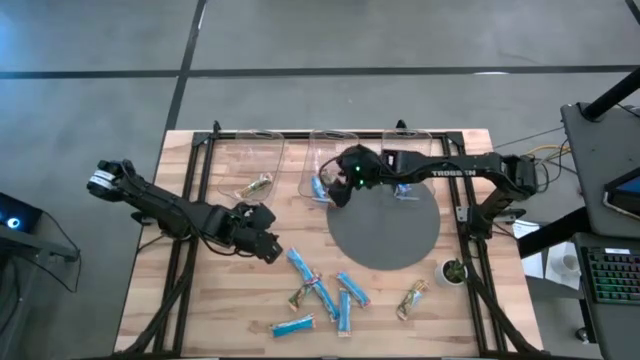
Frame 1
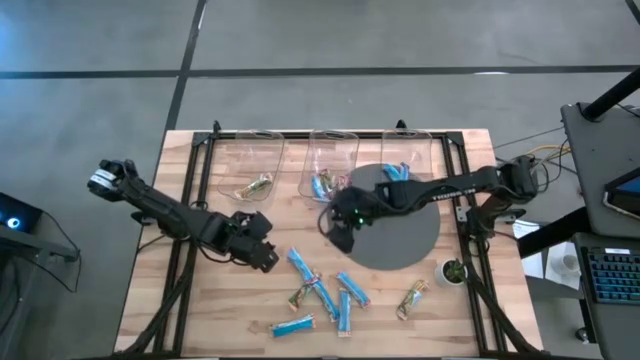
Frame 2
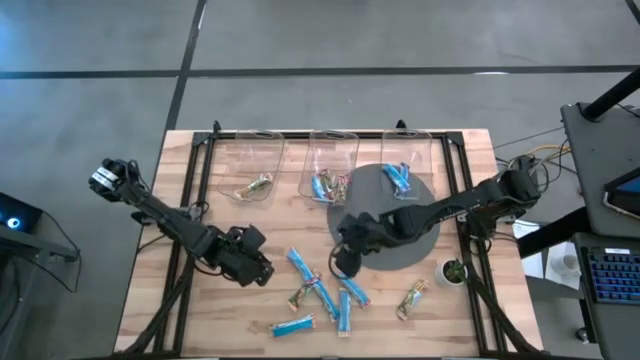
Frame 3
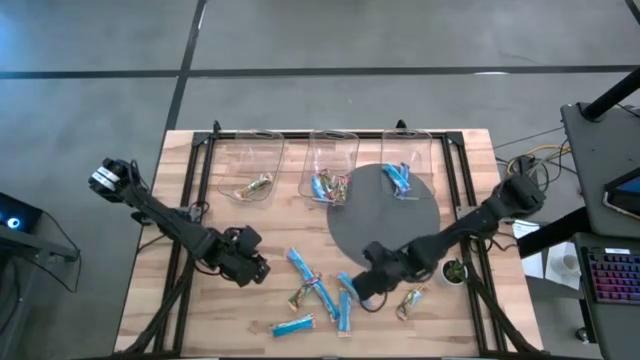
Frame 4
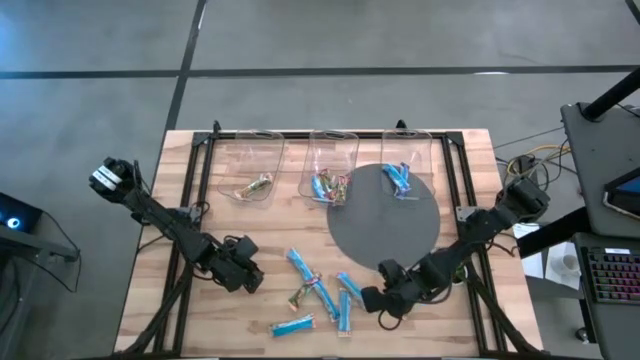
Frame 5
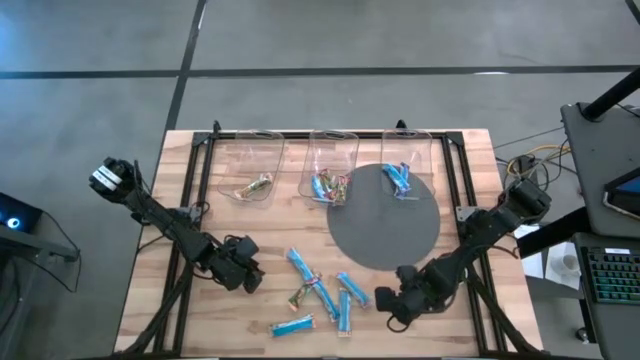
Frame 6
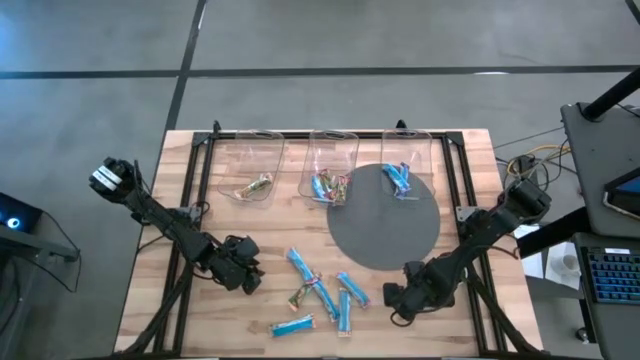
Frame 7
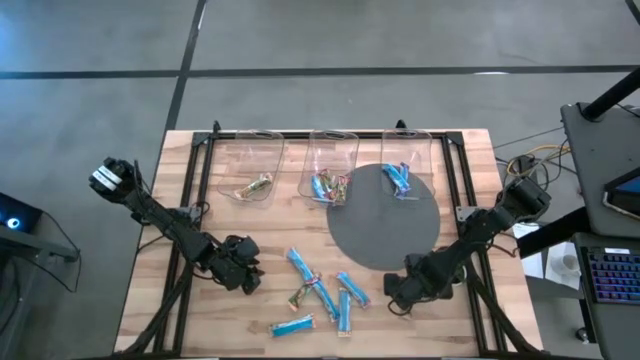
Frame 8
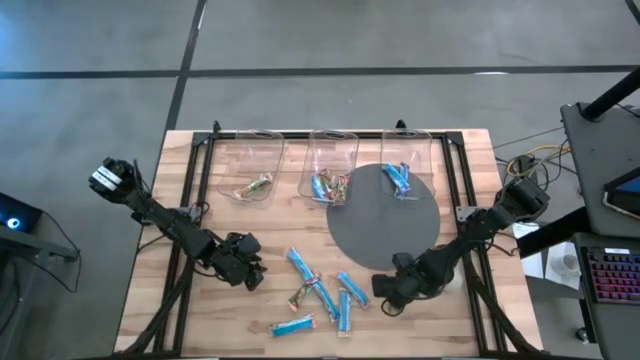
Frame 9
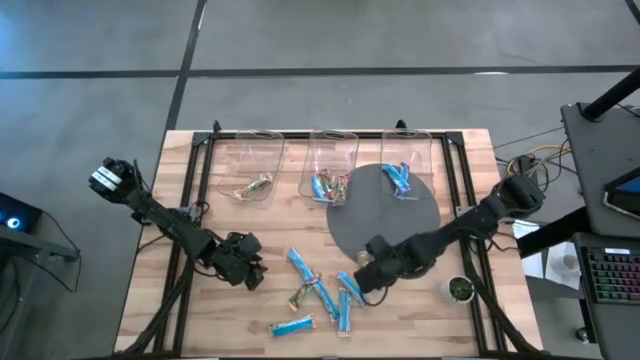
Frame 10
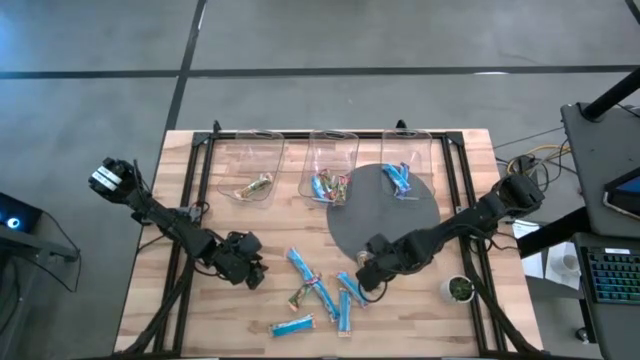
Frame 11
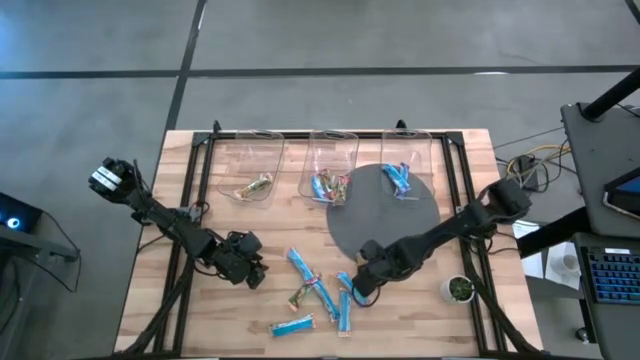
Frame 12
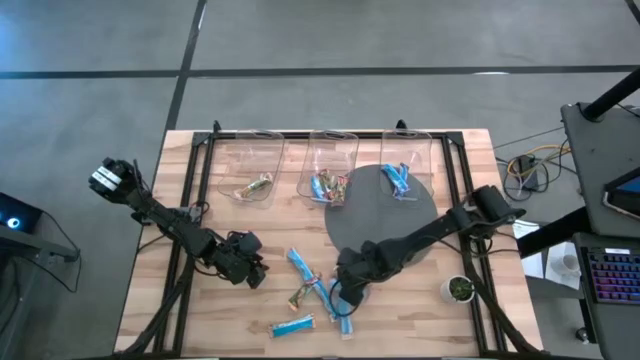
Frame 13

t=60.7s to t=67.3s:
Task: Pick and place Granola Bars by type
Put the yellow granola bar into the left transparent bin

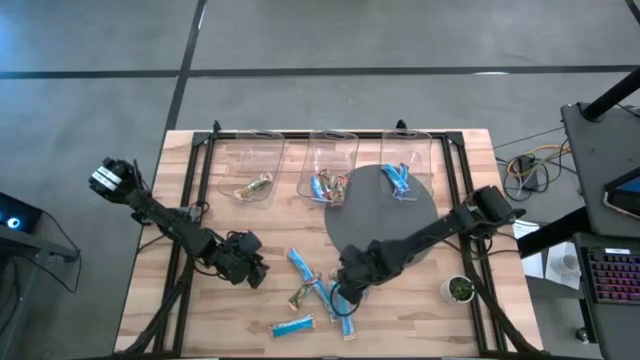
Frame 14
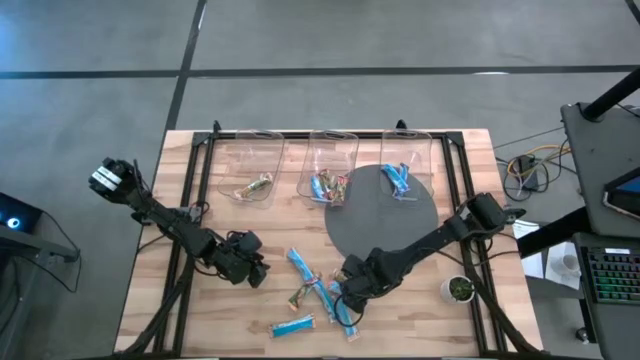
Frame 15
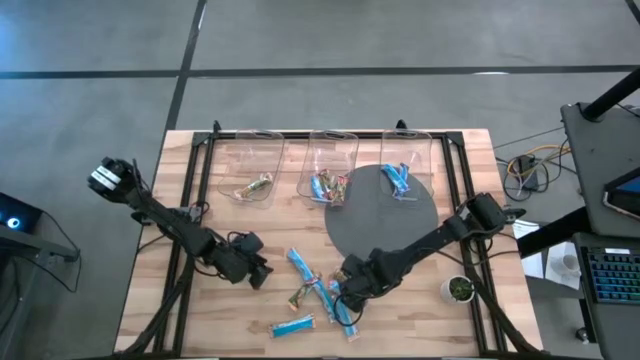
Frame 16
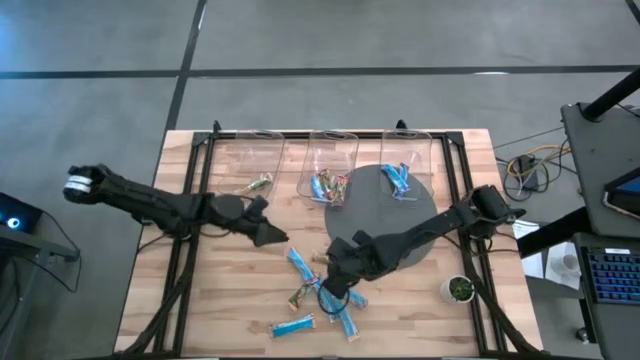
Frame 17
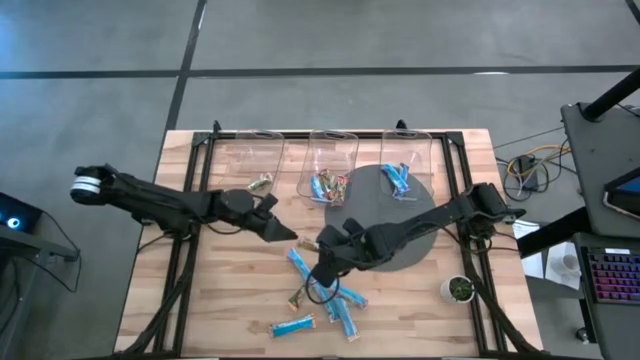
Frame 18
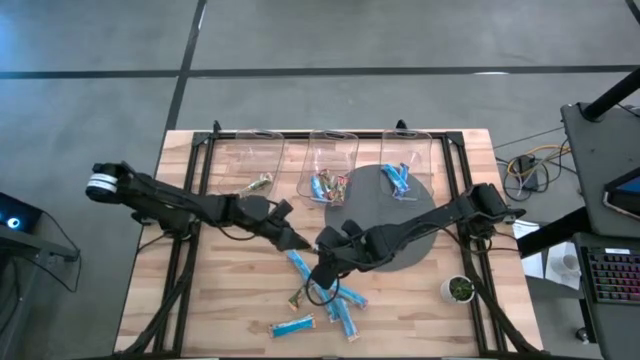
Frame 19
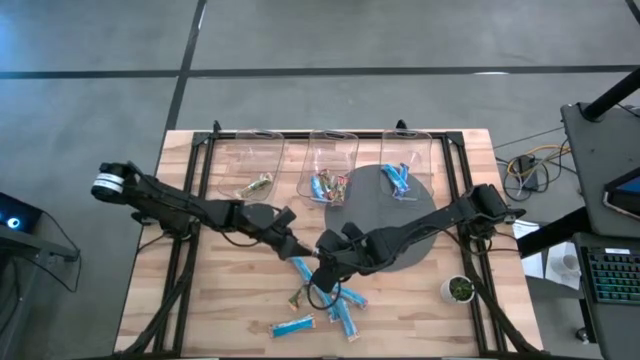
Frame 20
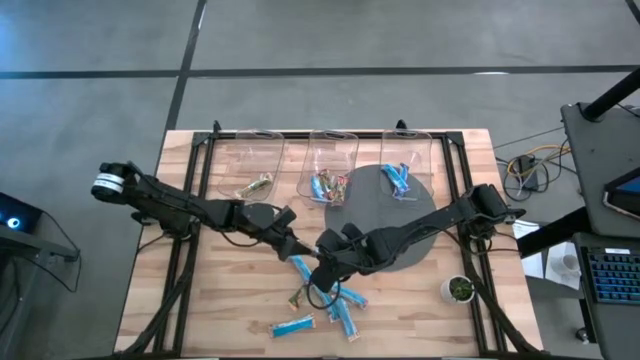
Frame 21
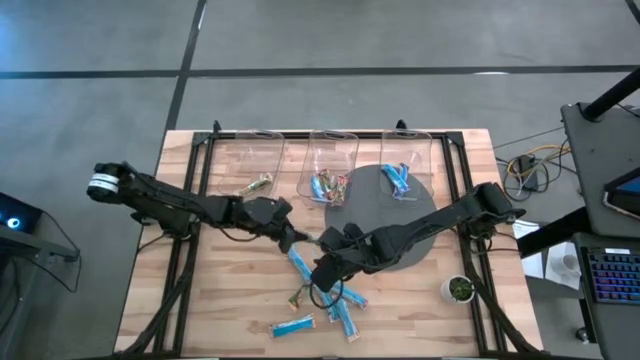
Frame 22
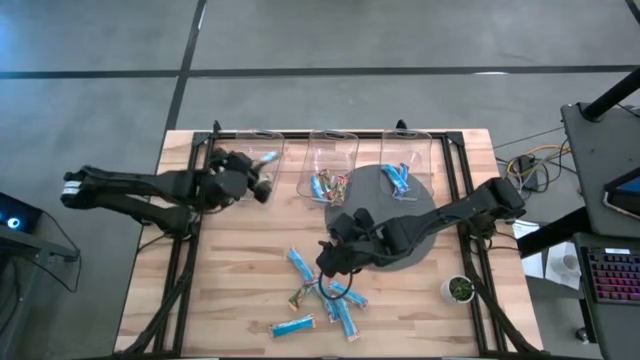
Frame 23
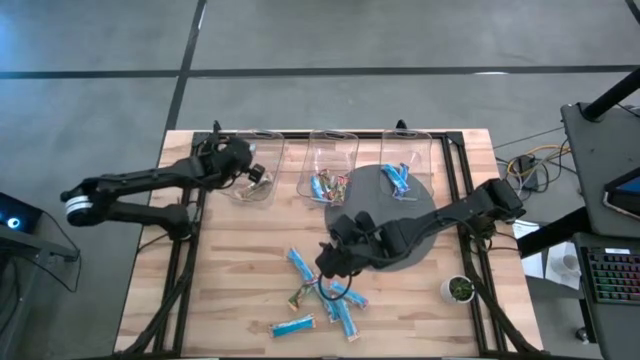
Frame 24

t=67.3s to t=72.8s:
Put the yellow granola bar into the left transparent bin

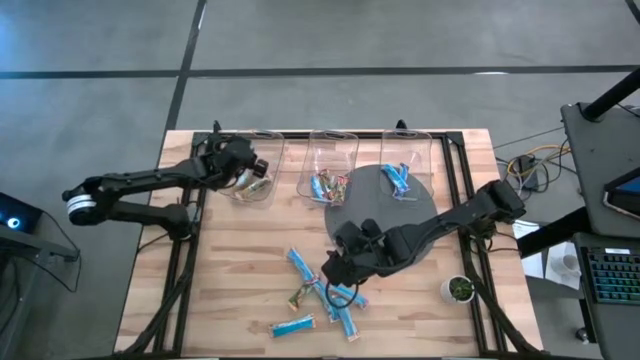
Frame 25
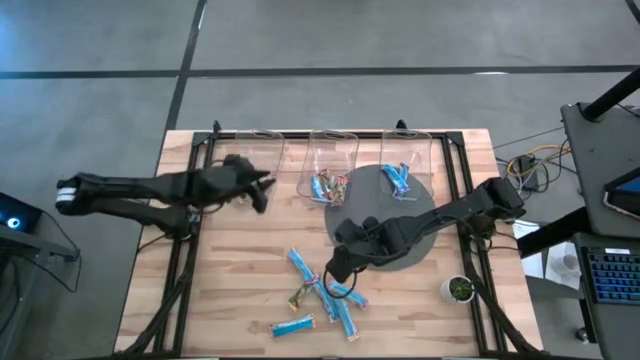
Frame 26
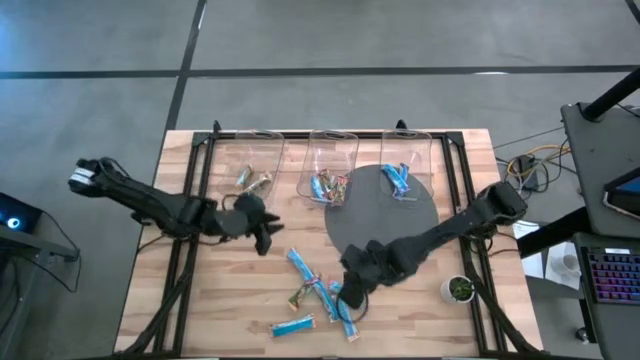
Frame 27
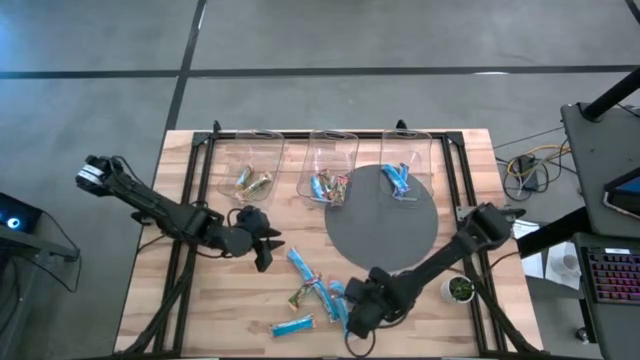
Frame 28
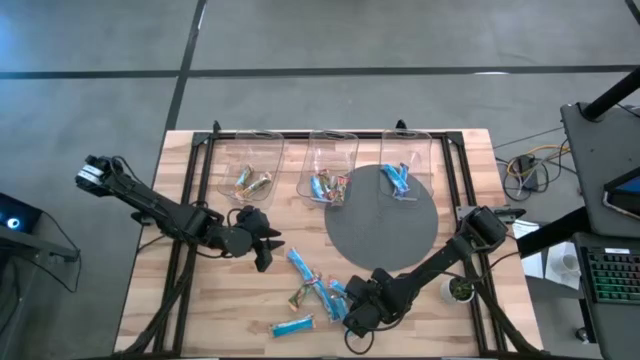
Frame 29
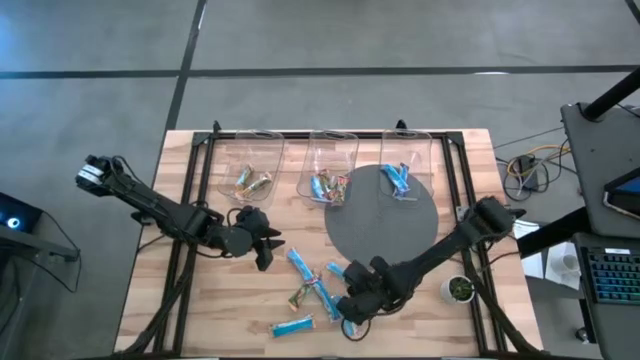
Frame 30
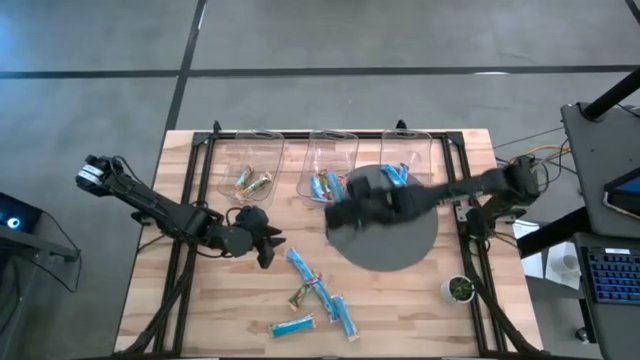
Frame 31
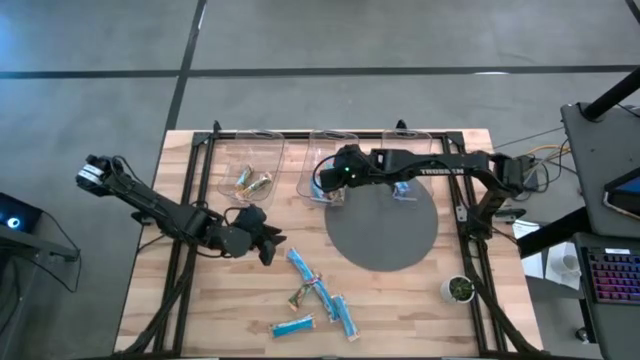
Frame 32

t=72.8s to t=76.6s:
Put the red granola bar into the middle transparent bin

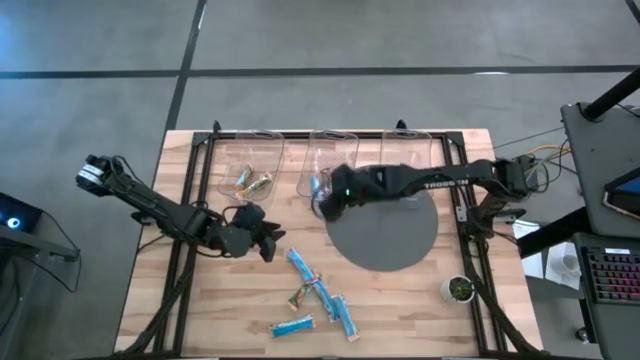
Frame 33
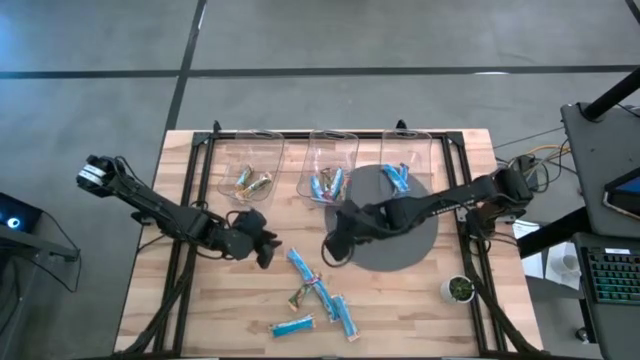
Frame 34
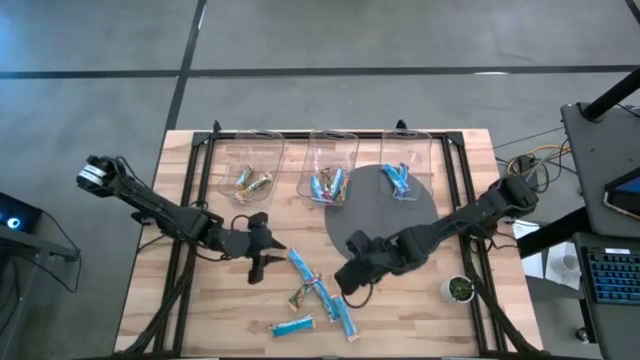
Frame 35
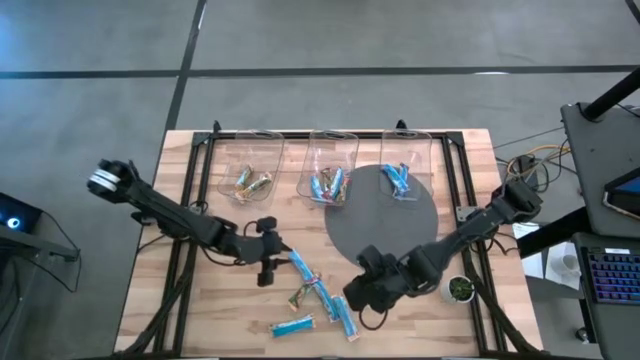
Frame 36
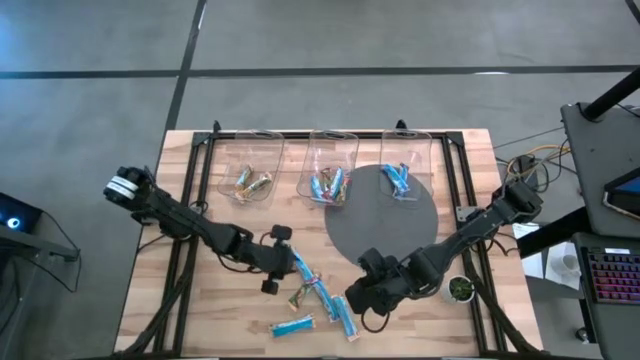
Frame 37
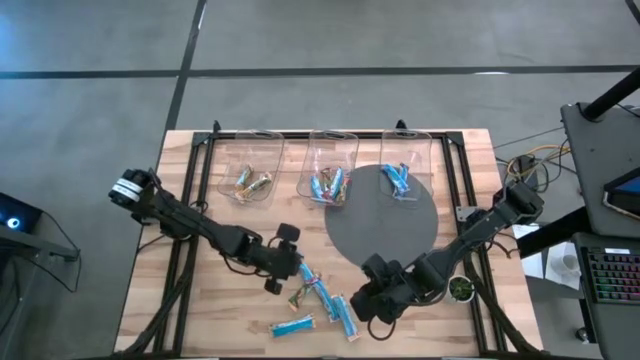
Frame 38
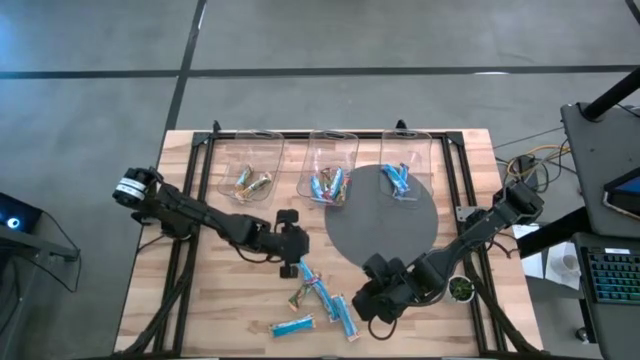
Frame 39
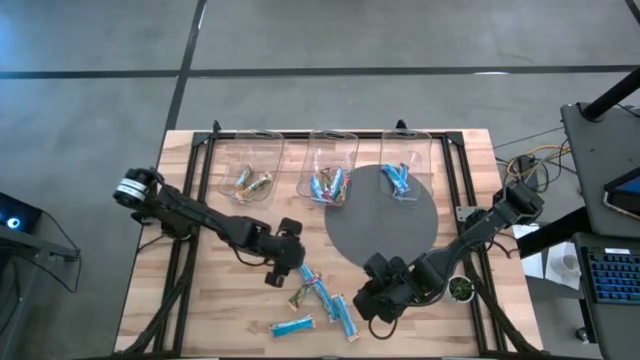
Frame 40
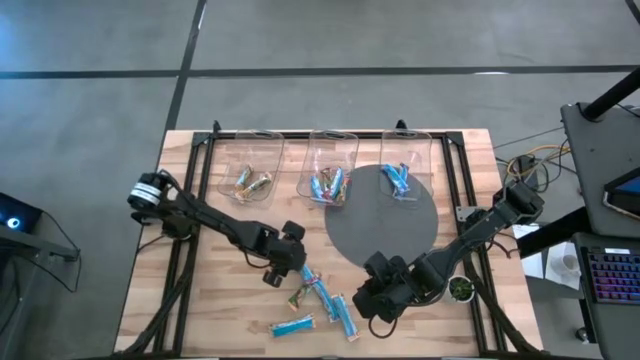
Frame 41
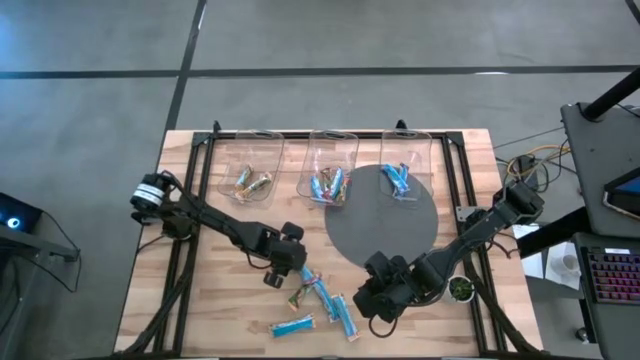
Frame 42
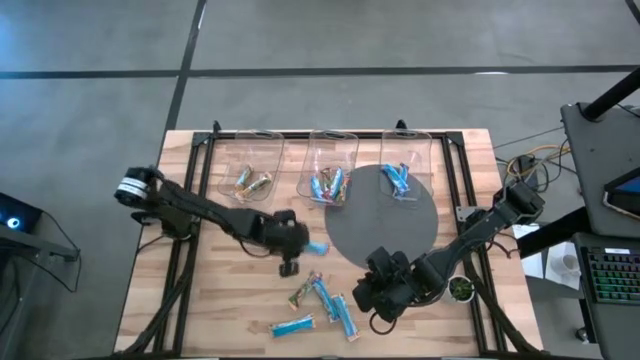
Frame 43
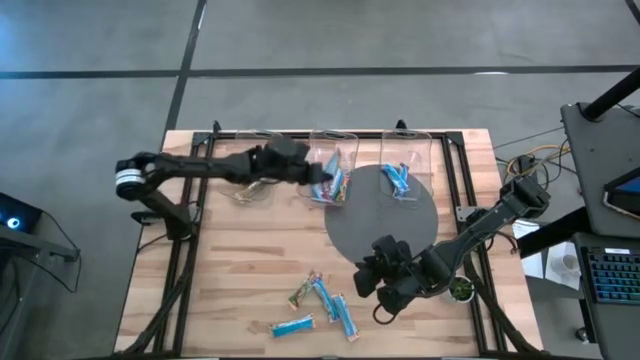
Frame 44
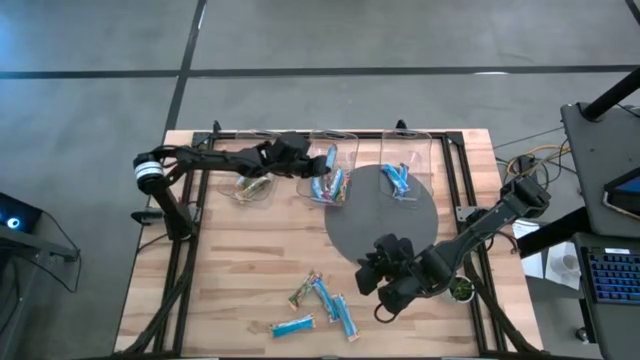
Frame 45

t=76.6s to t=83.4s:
Put the red granola bar into the middle transparent bin
